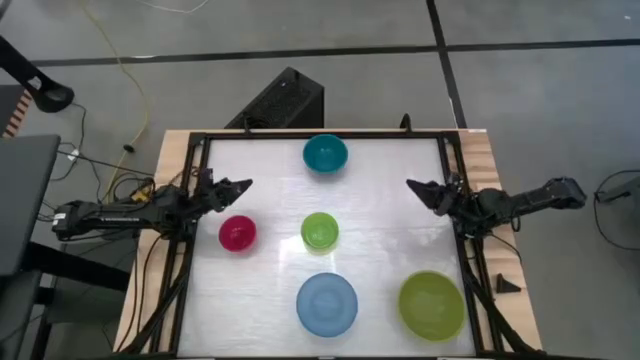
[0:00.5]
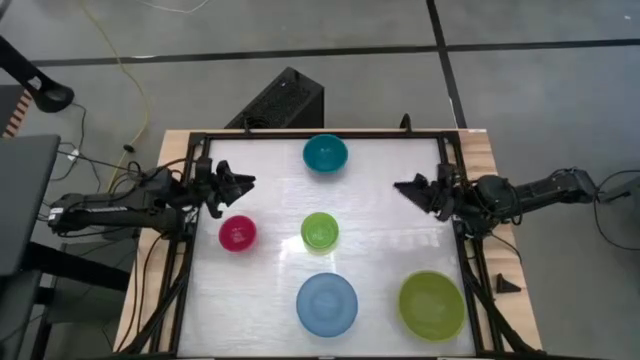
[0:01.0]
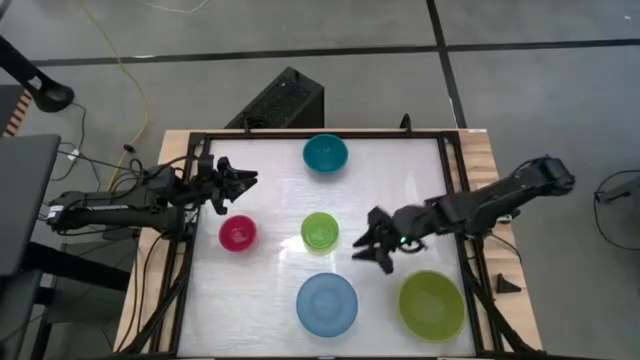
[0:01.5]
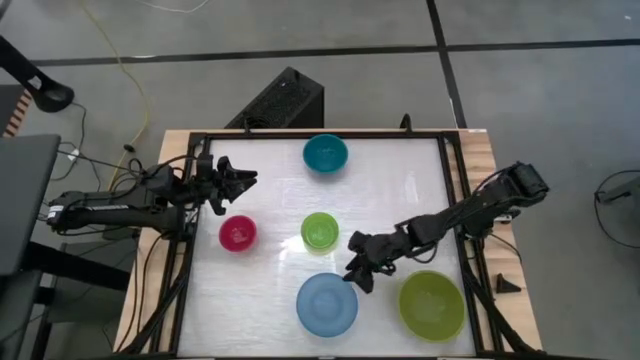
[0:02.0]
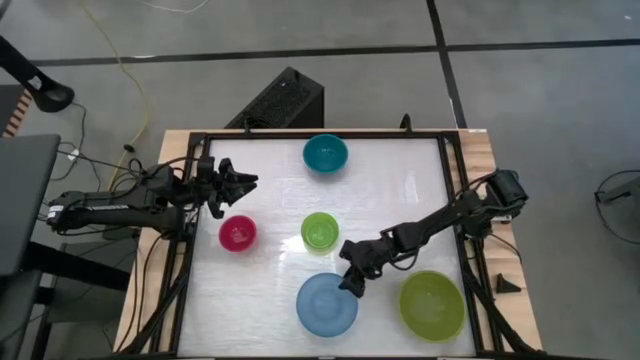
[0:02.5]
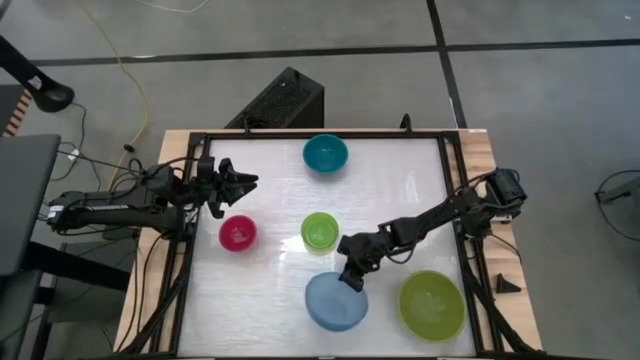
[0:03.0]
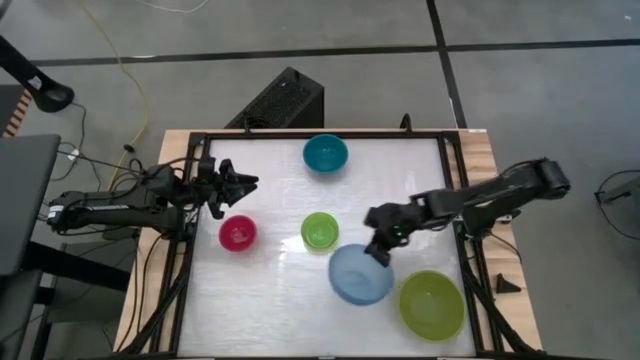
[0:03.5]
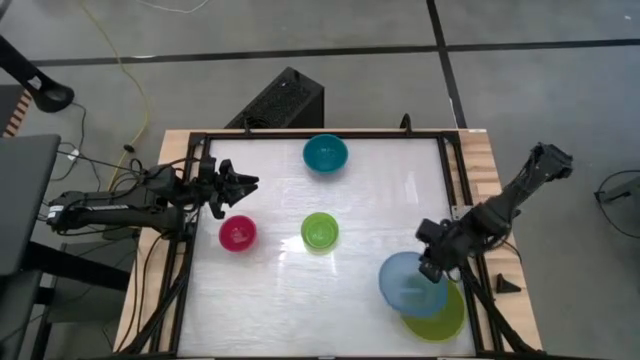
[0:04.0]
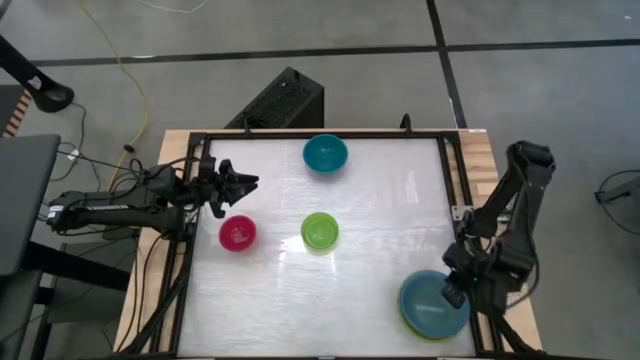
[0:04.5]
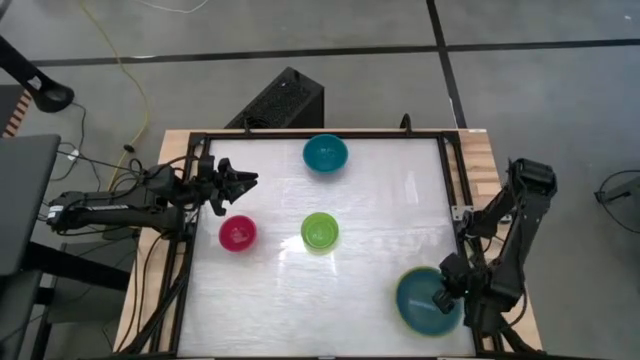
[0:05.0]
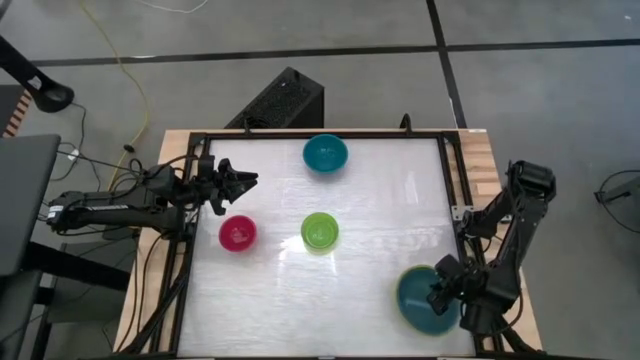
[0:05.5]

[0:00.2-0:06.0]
Stack the light blue bowl on the green bowl

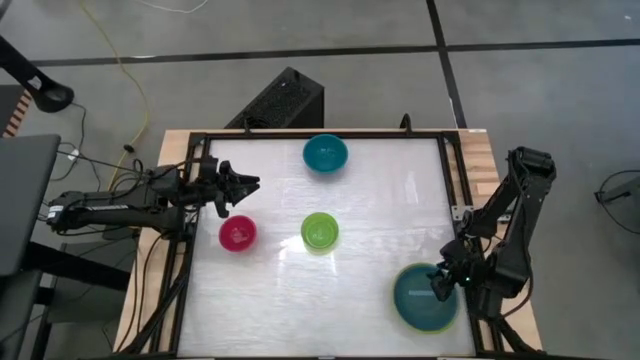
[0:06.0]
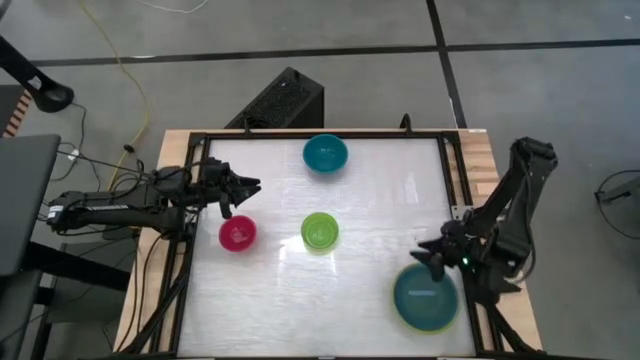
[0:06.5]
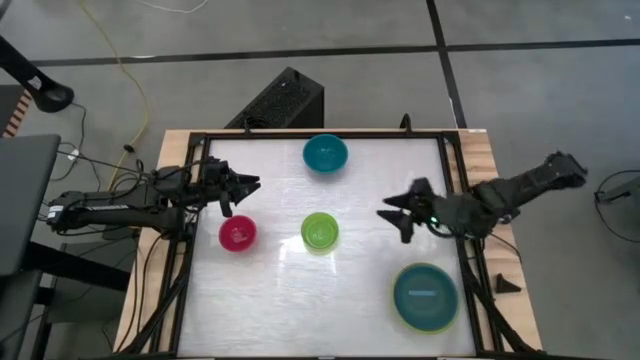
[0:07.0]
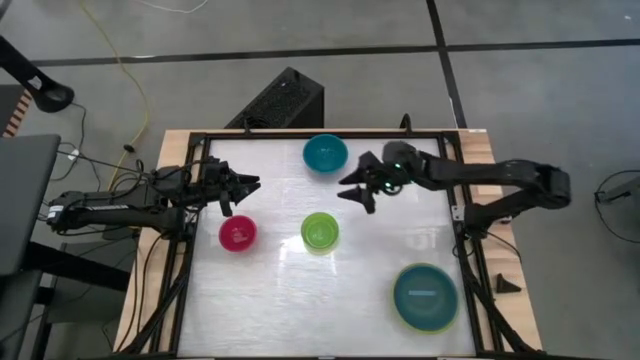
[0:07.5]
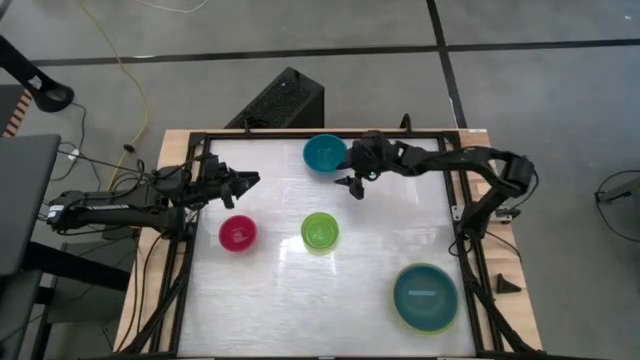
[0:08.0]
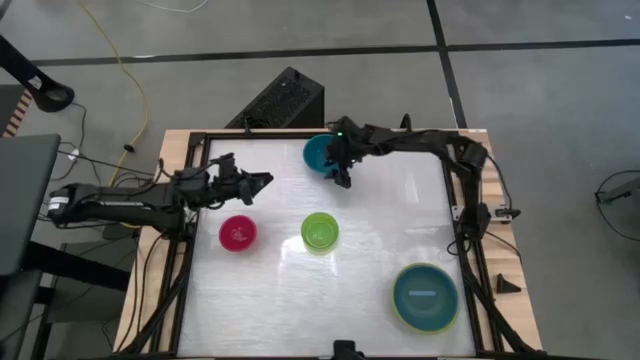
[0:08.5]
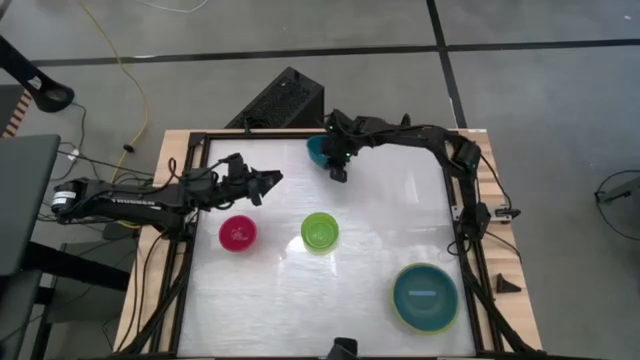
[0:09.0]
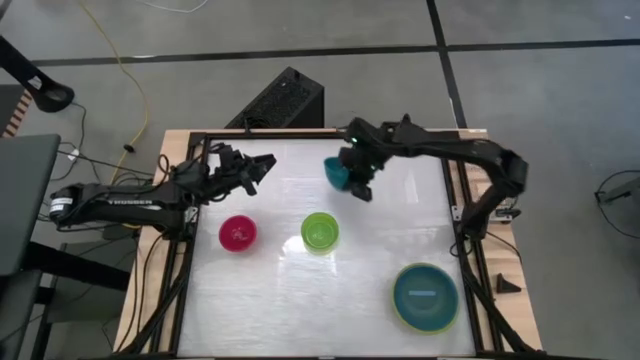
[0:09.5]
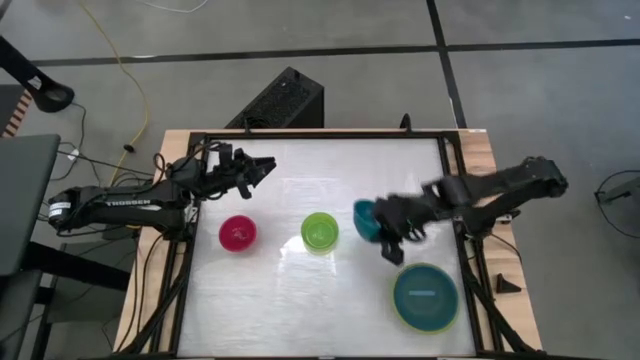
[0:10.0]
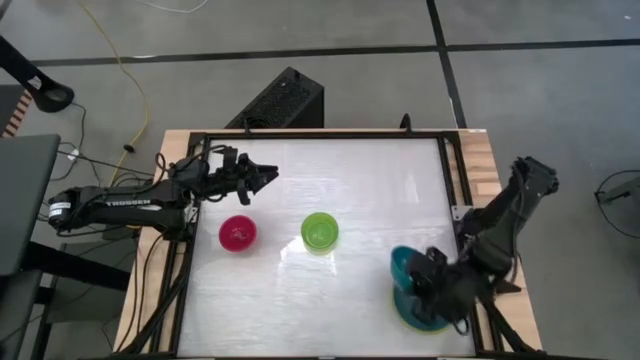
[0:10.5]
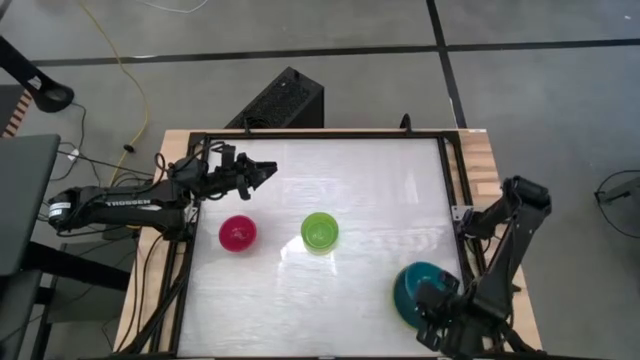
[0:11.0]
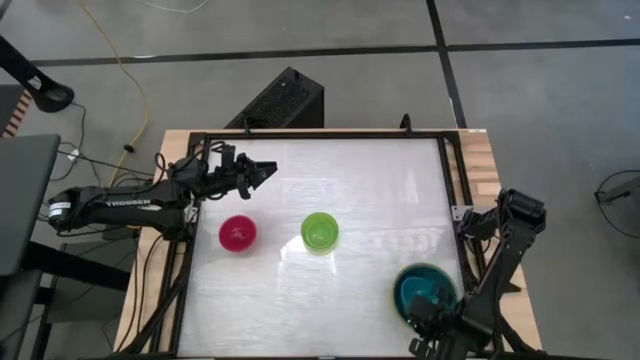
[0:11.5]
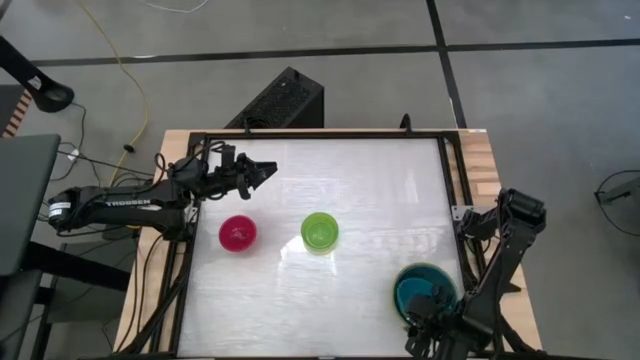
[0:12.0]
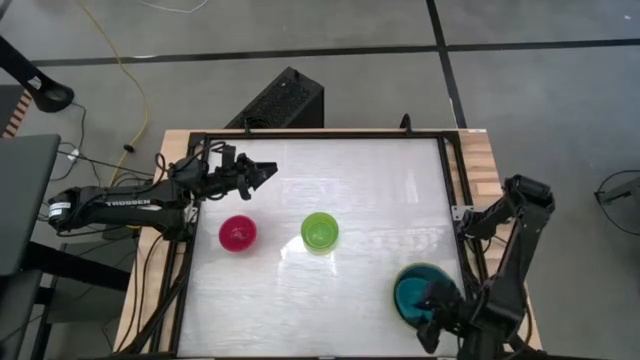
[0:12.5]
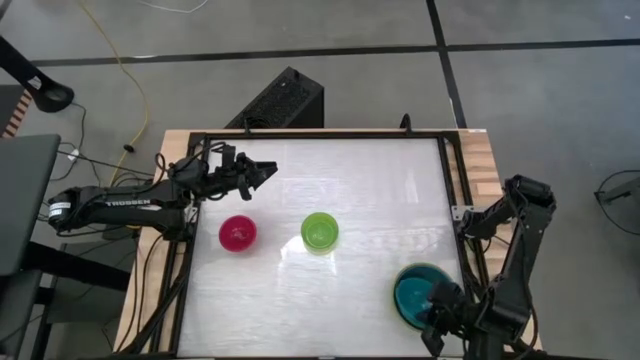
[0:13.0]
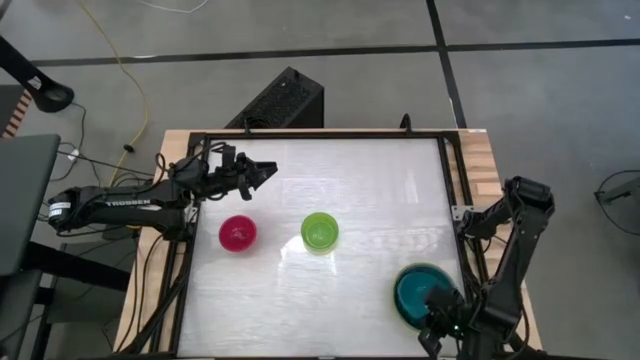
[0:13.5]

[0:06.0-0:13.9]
Stack the blue bowl on the light blue bowl

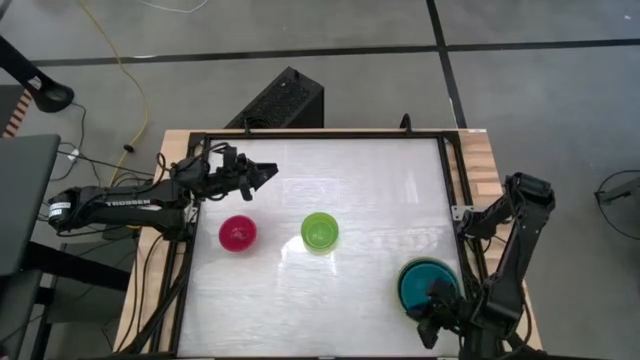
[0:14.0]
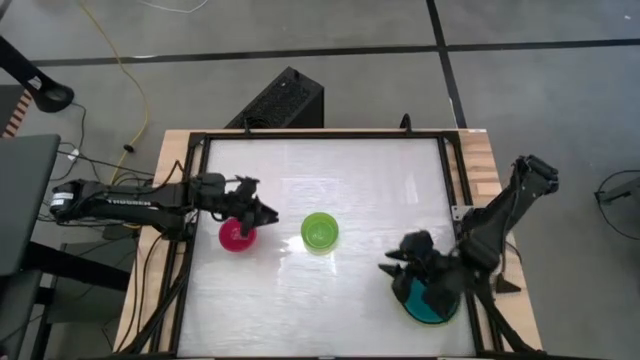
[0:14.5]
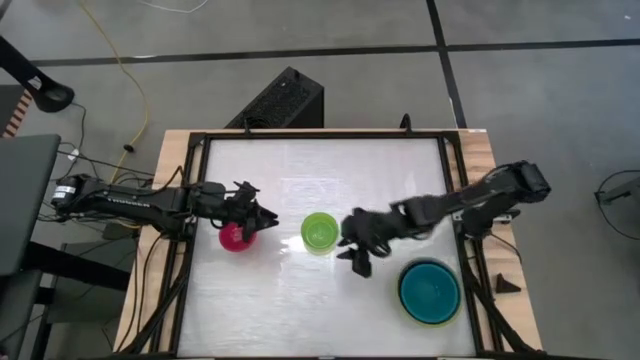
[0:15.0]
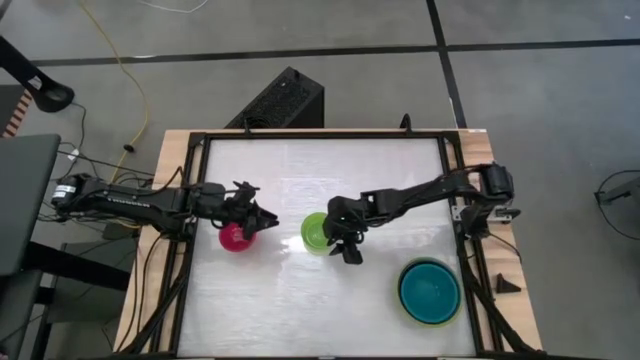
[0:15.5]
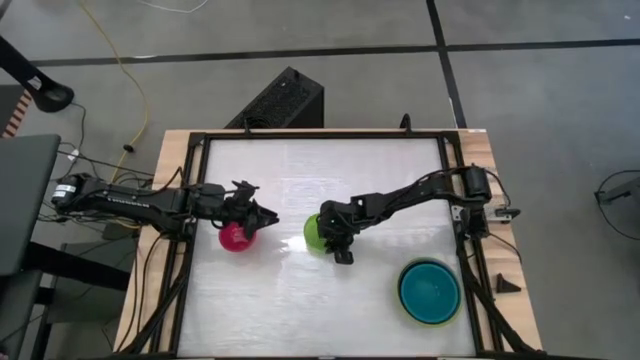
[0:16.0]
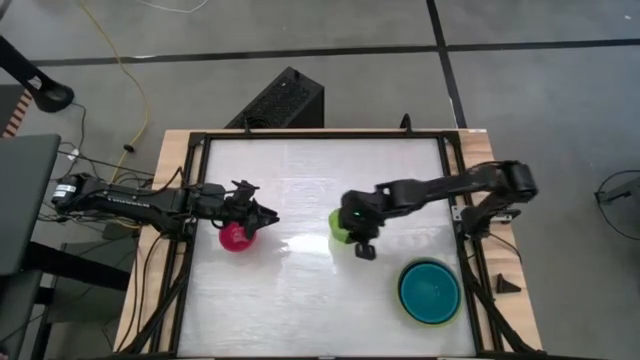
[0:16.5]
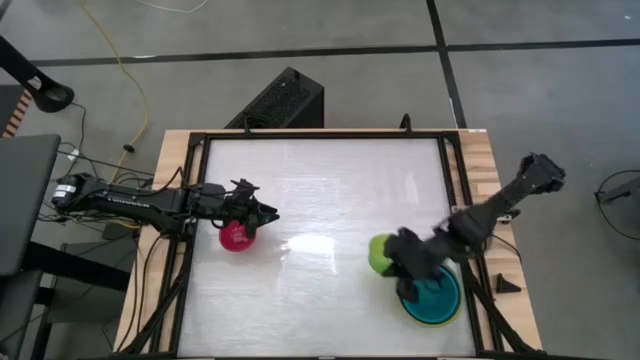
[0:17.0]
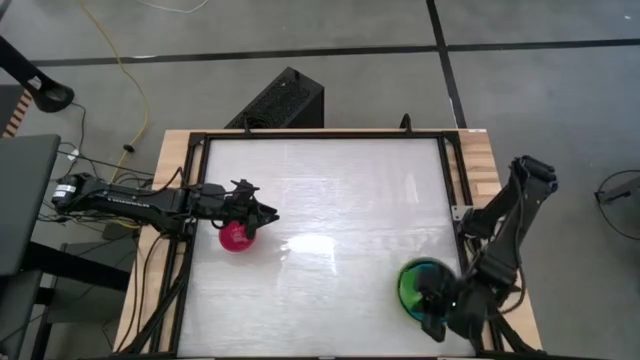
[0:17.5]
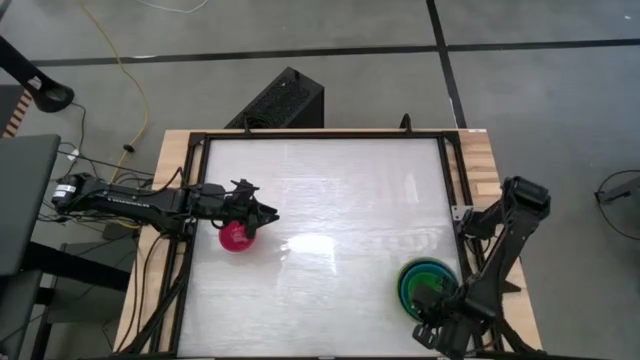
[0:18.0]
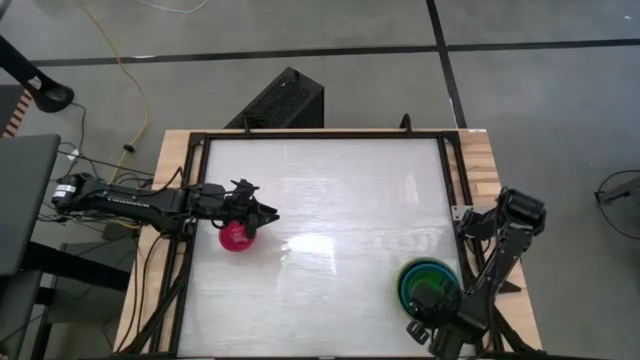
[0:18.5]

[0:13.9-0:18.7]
Stack the green bowl on the blue bowl
